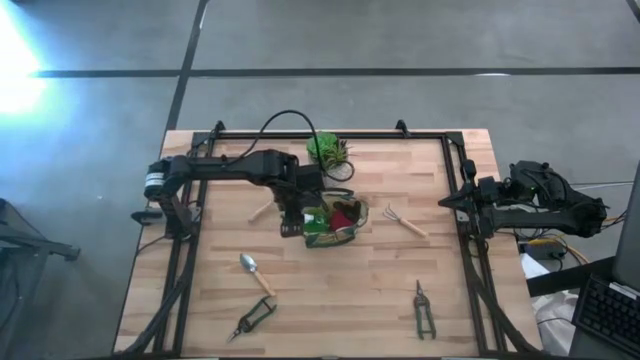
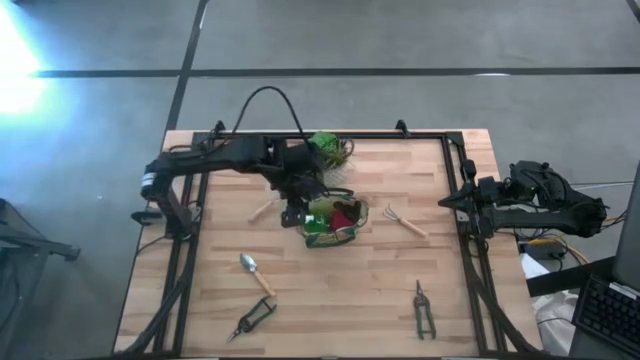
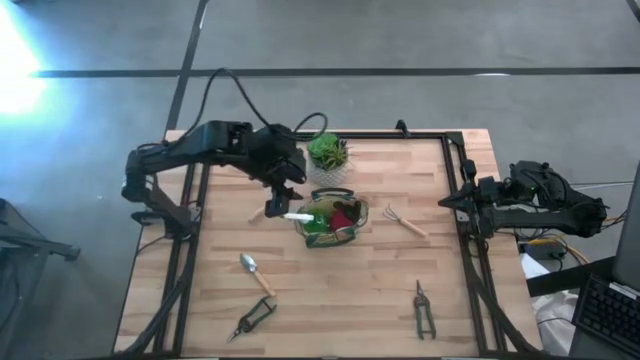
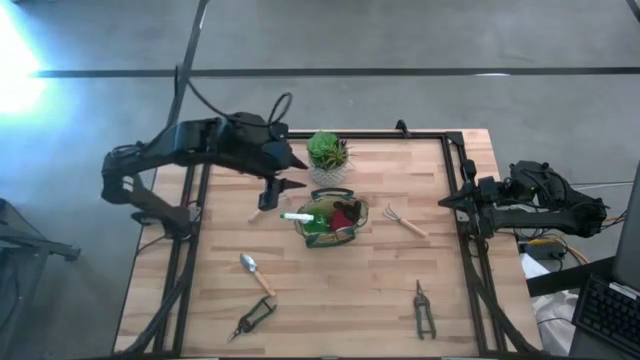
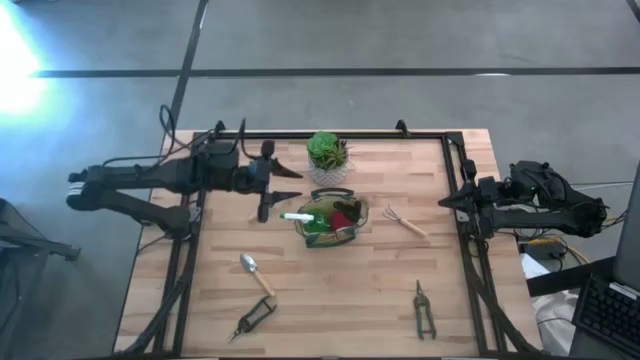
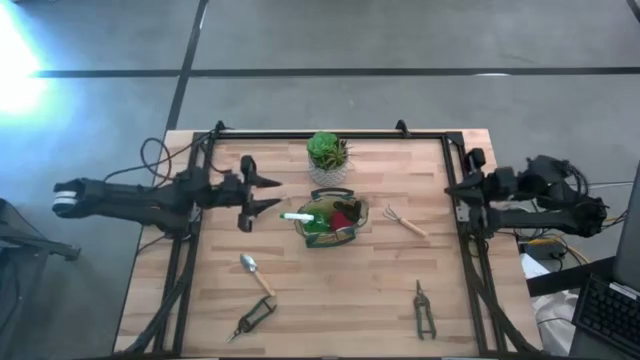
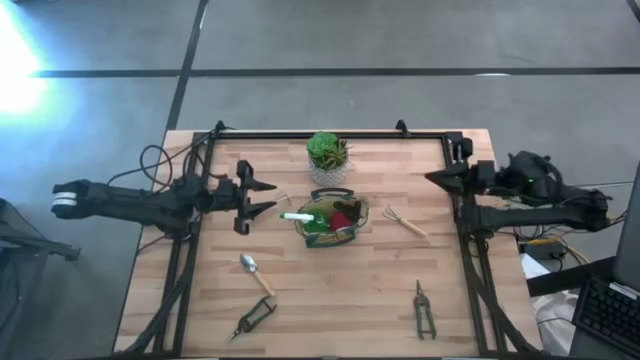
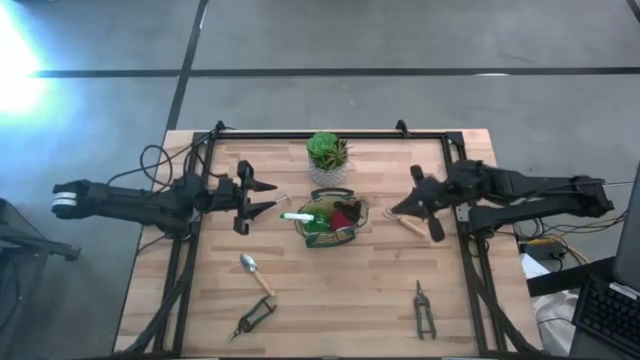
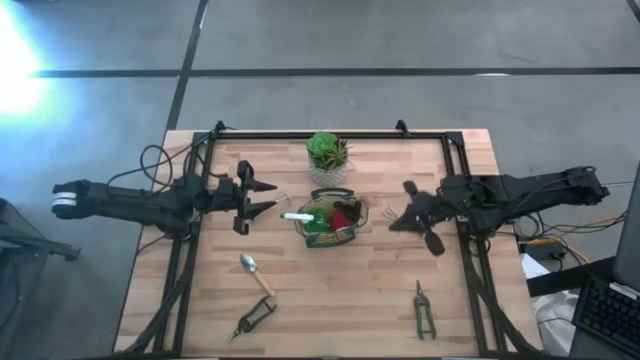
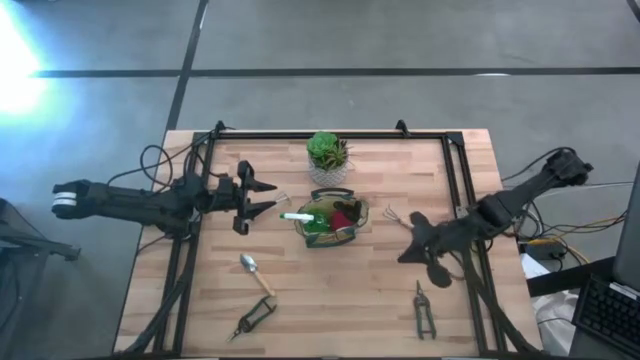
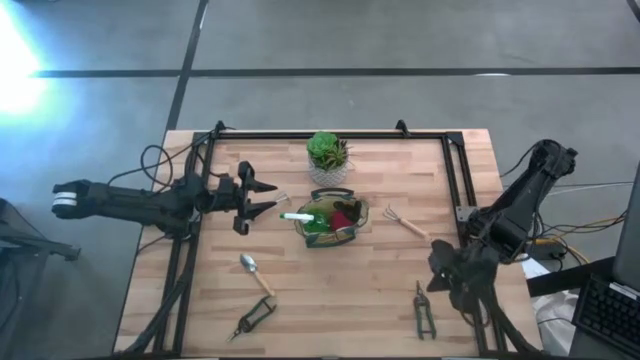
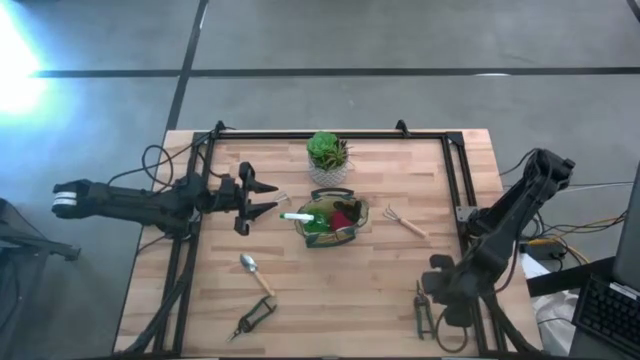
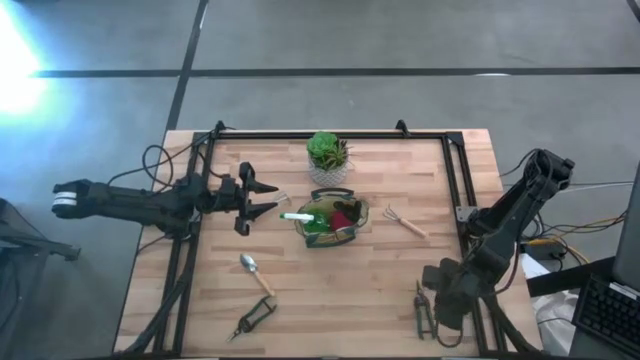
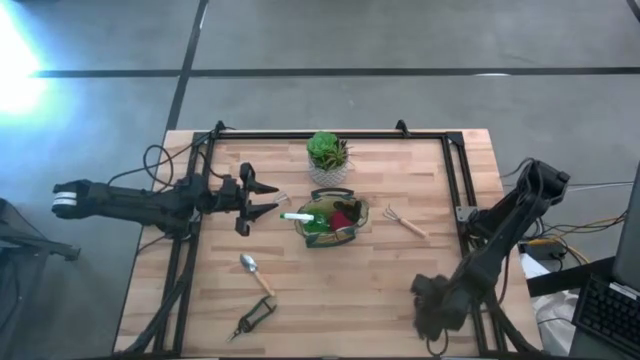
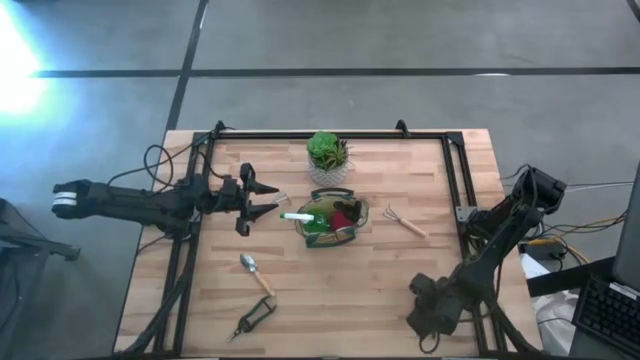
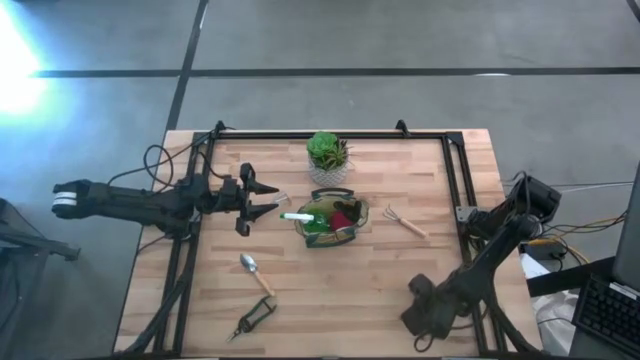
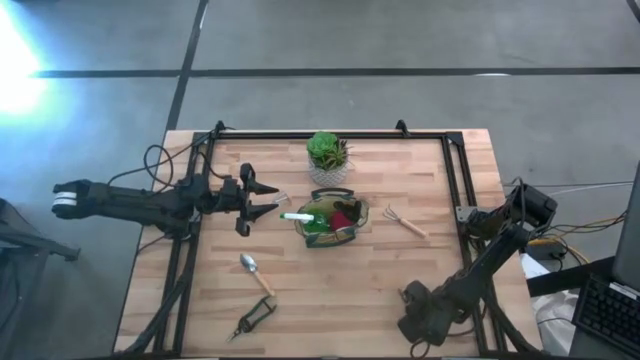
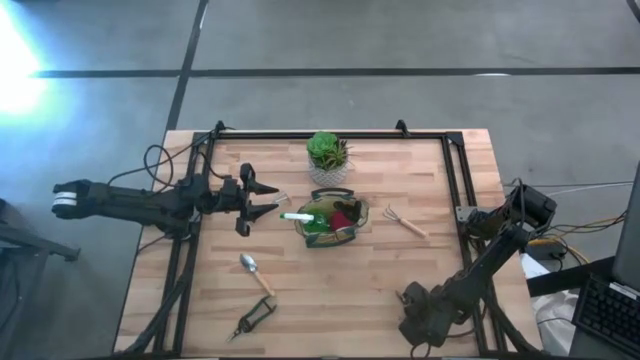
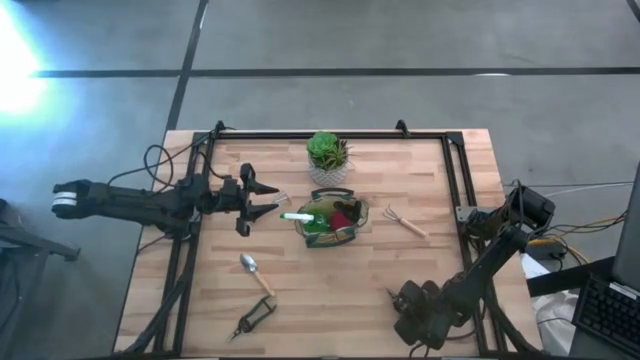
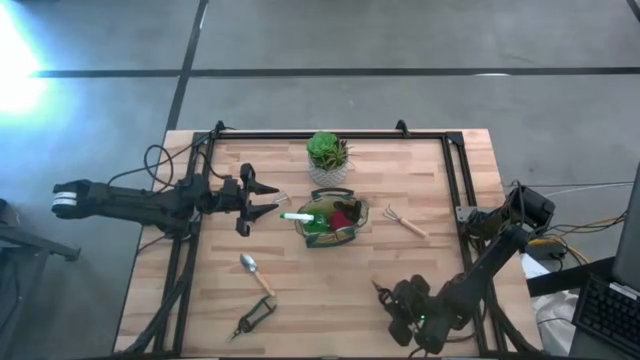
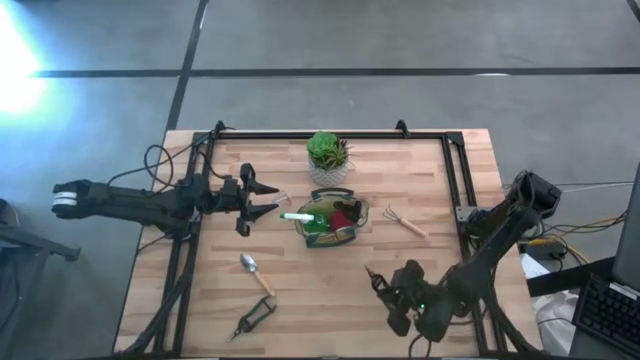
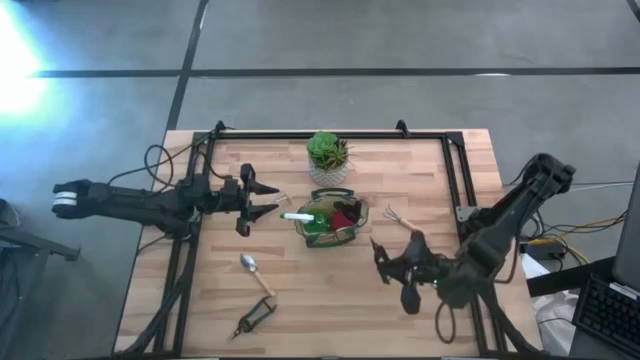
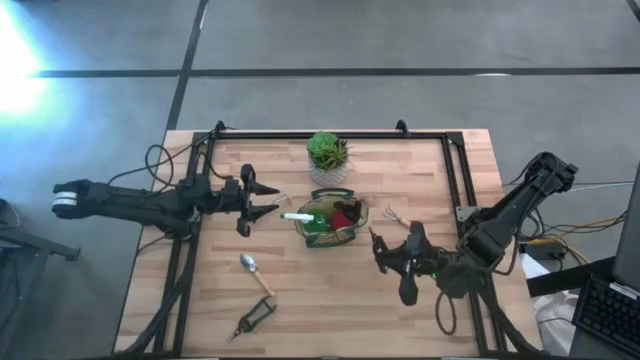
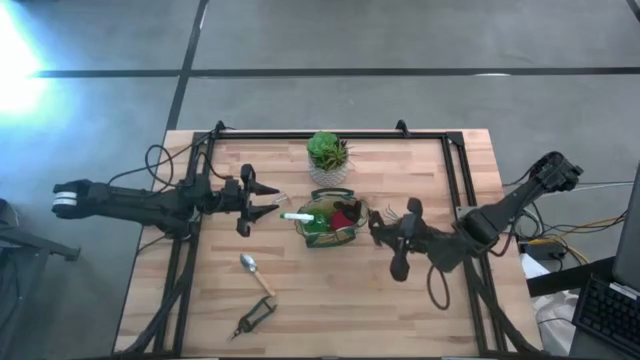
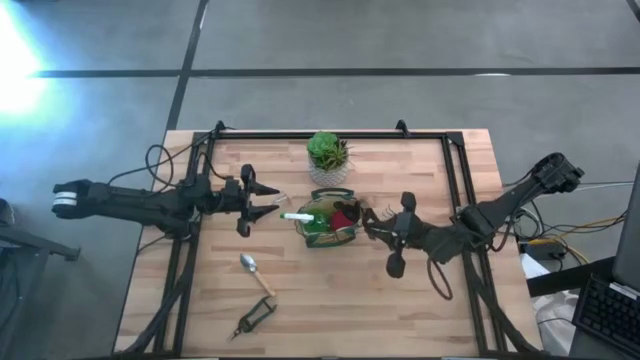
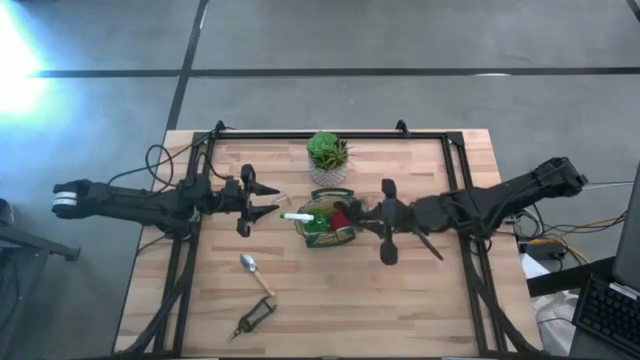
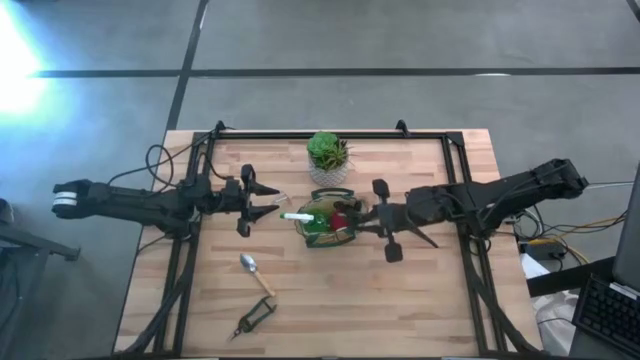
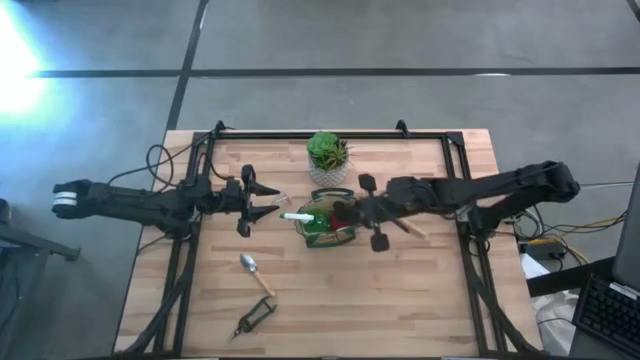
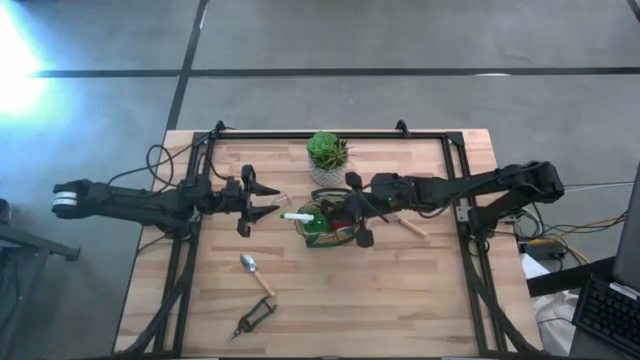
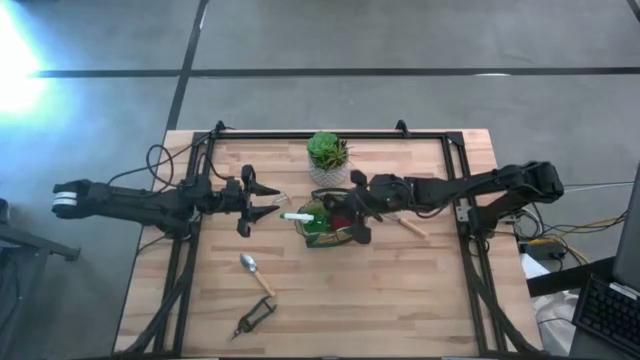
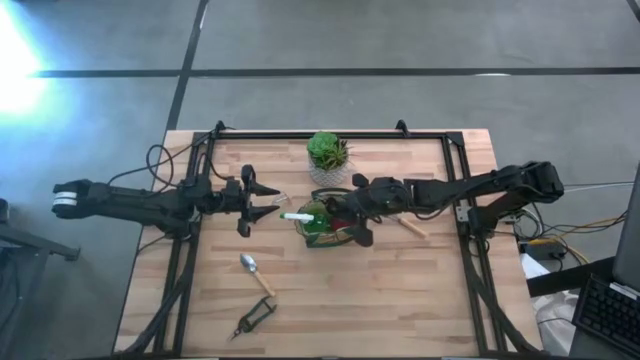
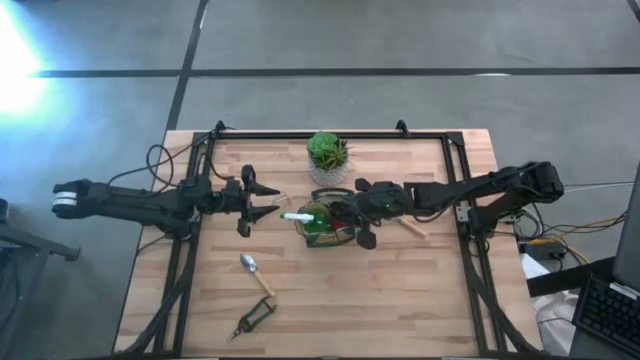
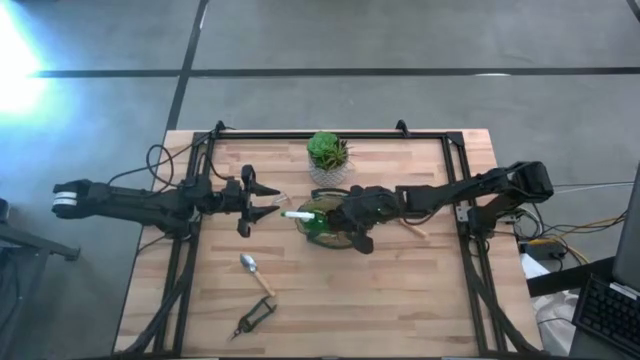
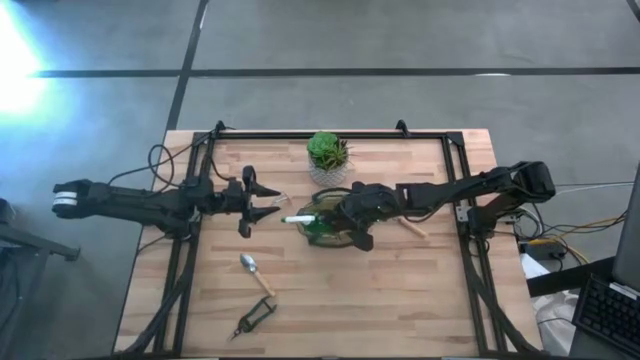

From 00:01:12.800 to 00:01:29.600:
Task: Pick & Place Garden tools in Gardening bag
Put the right green shear scissors into the gardening bag

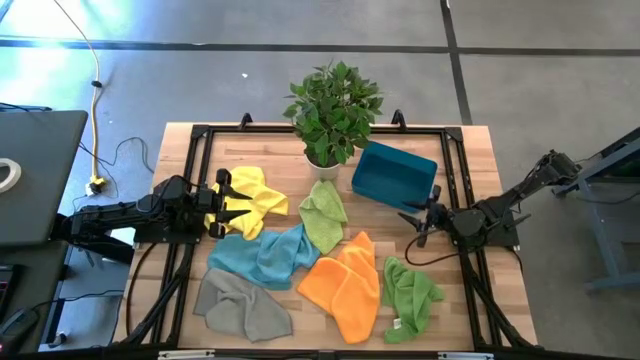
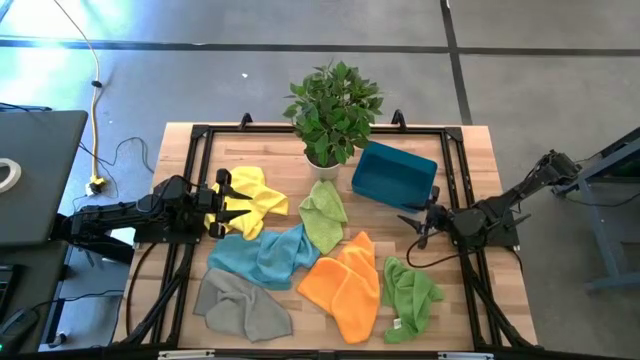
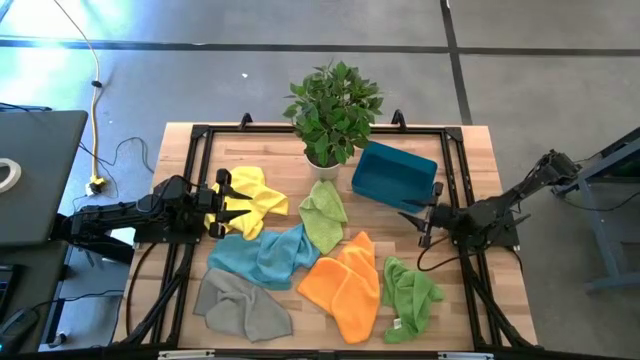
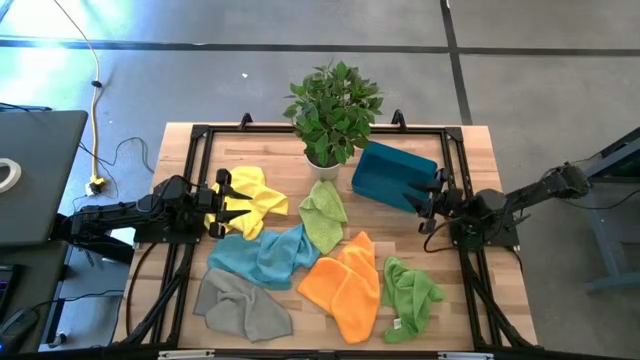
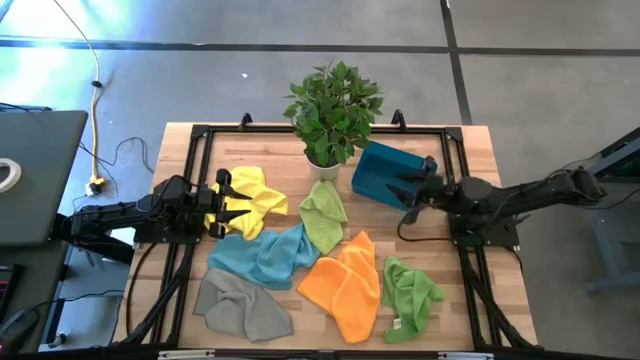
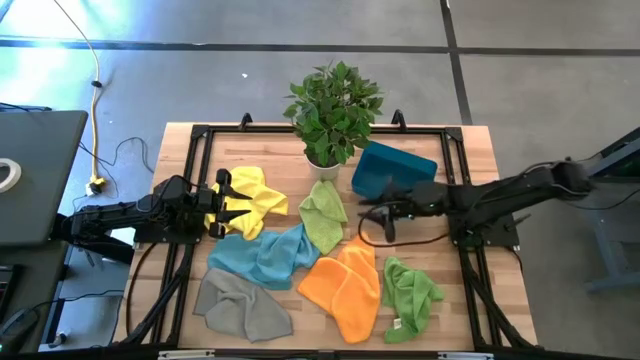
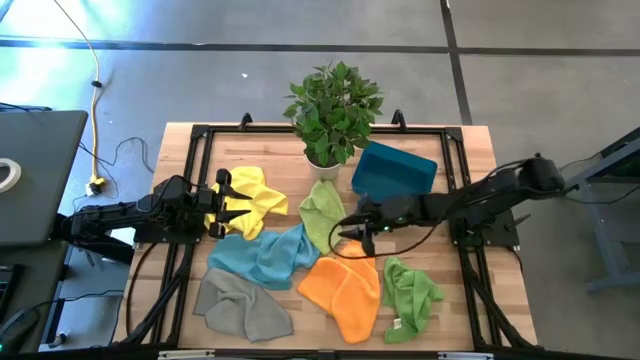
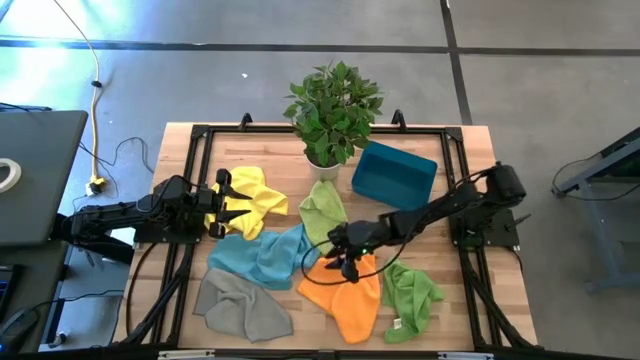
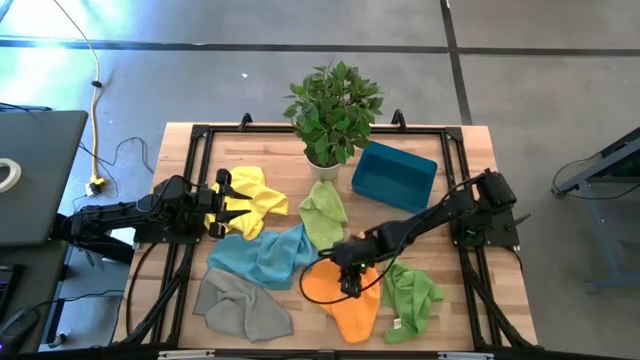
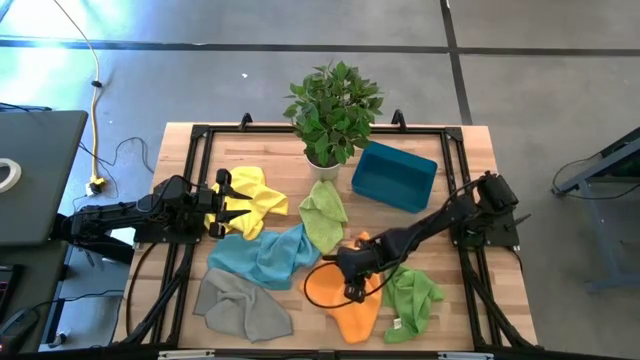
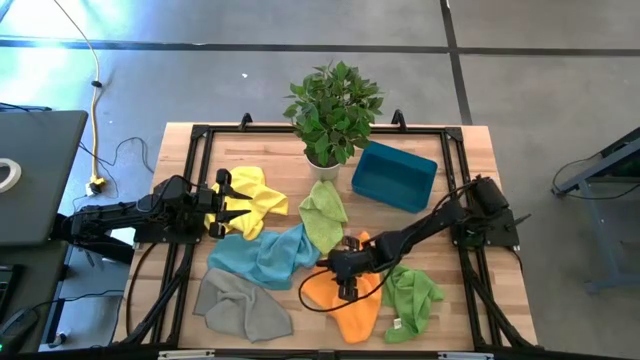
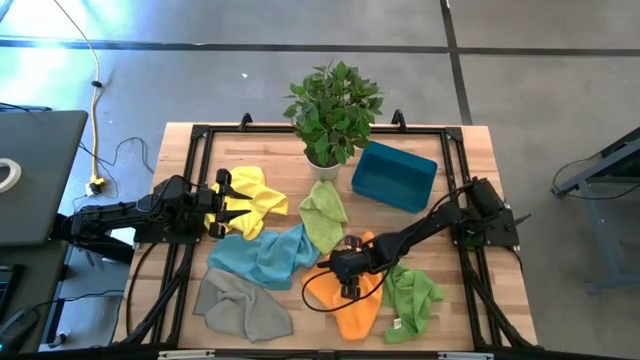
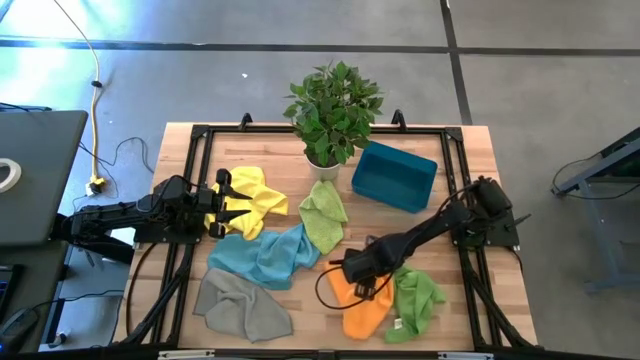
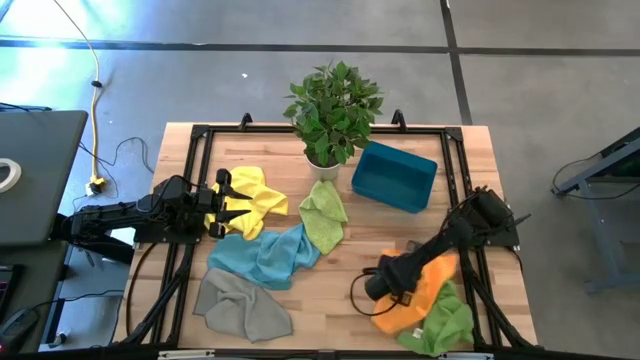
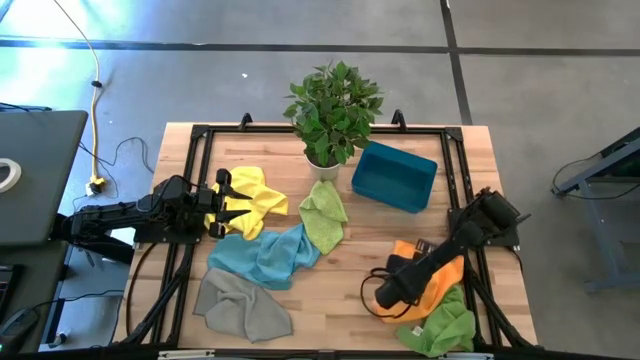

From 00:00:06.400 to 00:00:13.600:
Task: Fold microfiber towels
Adjust the orange towel
